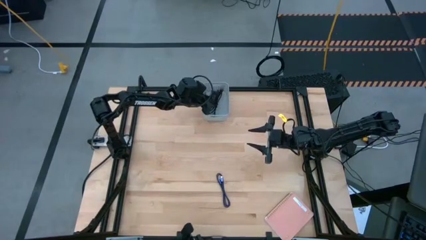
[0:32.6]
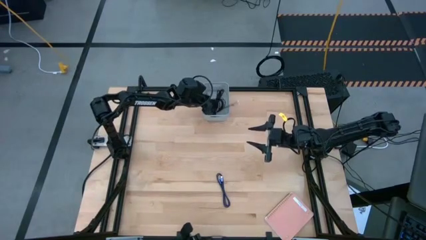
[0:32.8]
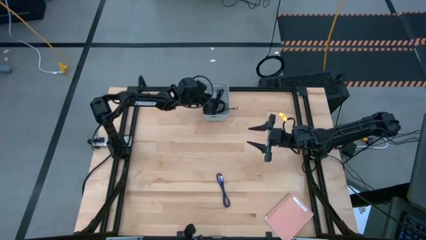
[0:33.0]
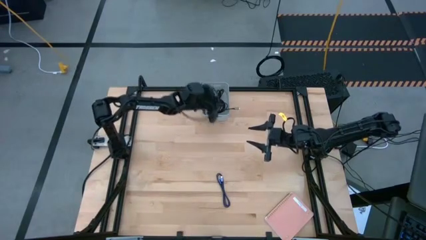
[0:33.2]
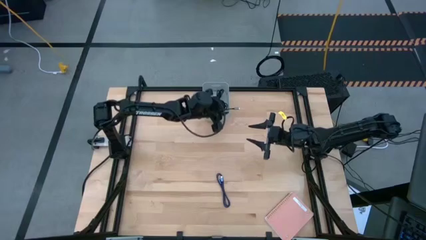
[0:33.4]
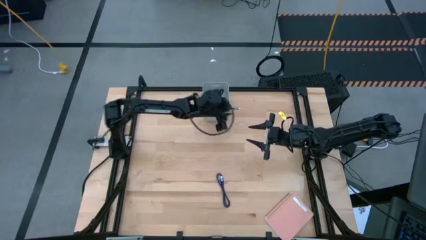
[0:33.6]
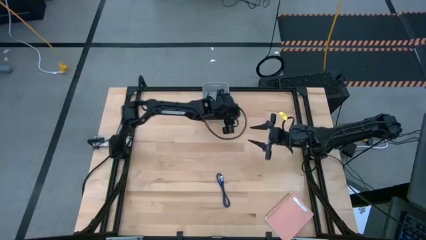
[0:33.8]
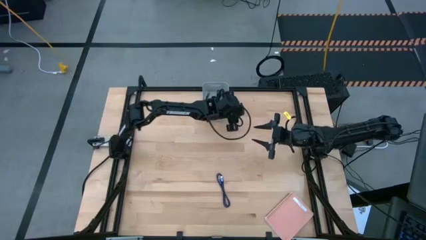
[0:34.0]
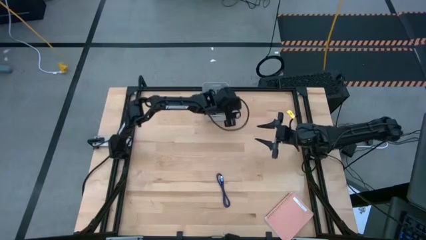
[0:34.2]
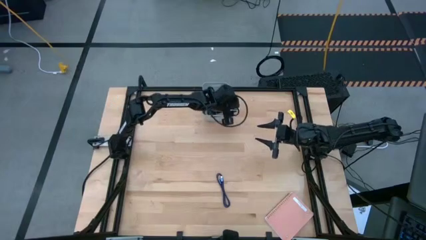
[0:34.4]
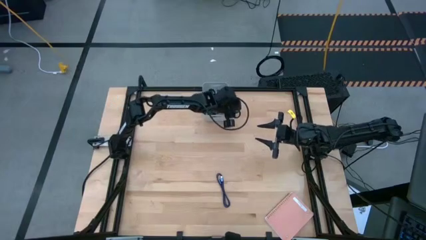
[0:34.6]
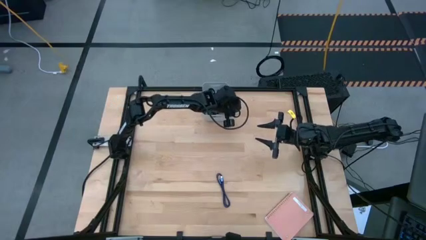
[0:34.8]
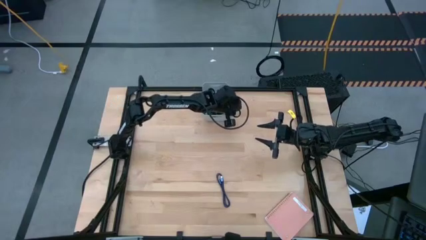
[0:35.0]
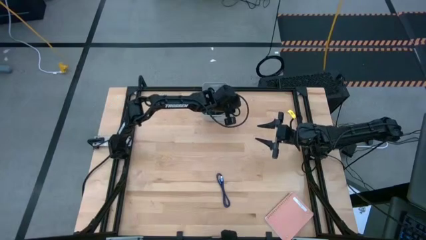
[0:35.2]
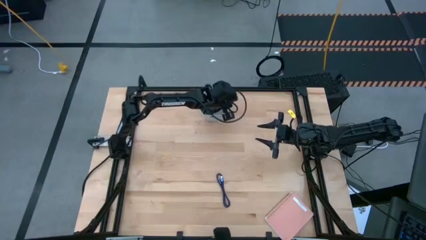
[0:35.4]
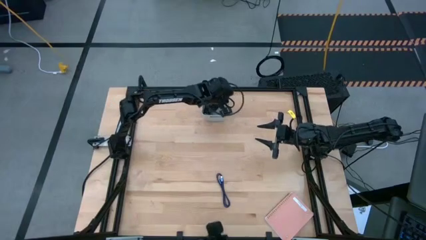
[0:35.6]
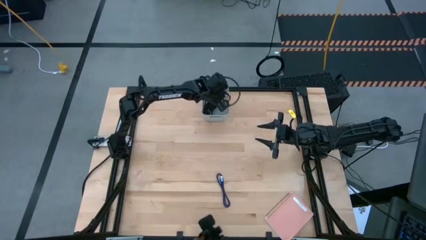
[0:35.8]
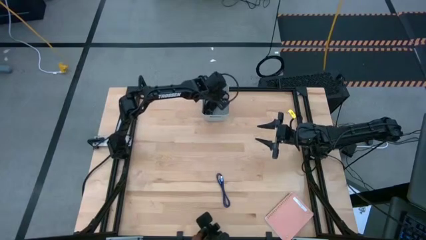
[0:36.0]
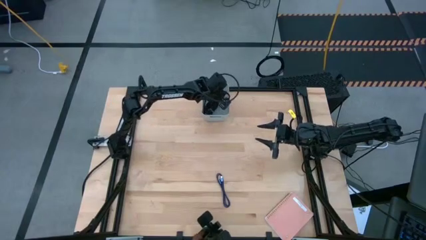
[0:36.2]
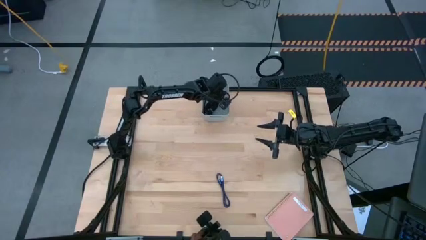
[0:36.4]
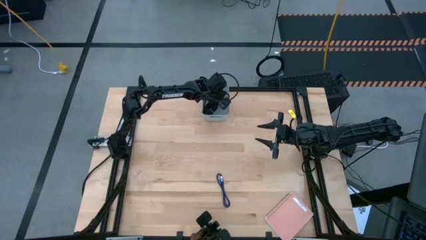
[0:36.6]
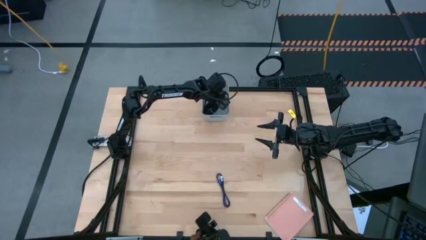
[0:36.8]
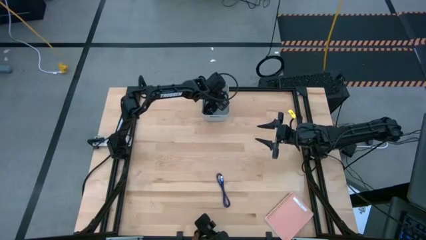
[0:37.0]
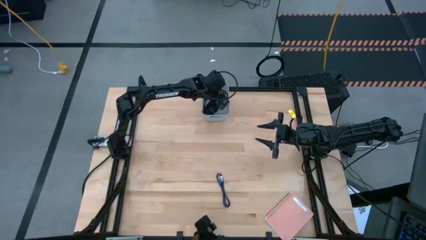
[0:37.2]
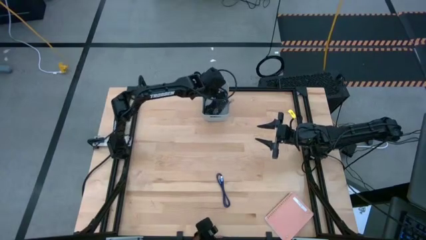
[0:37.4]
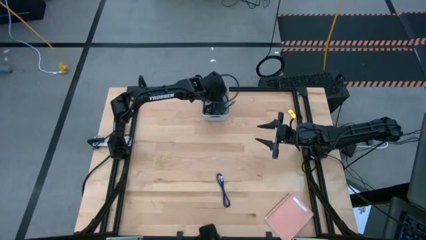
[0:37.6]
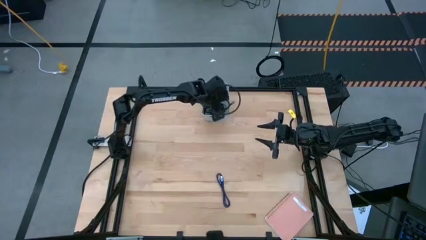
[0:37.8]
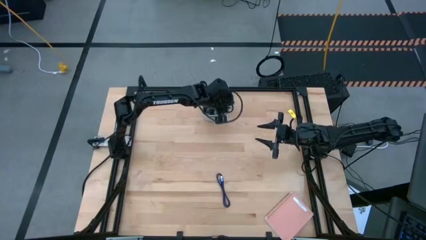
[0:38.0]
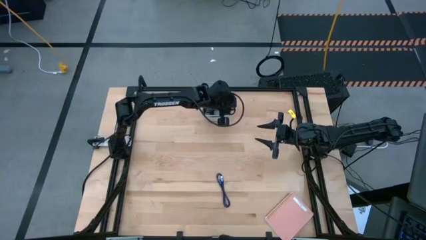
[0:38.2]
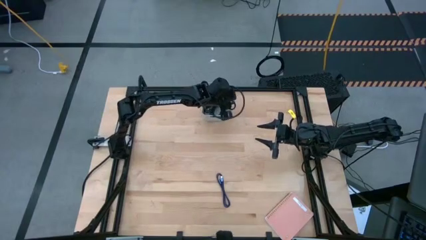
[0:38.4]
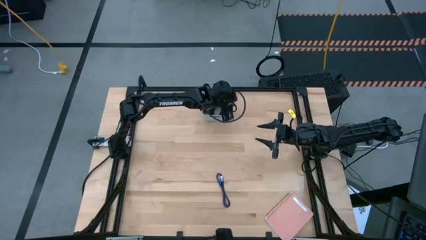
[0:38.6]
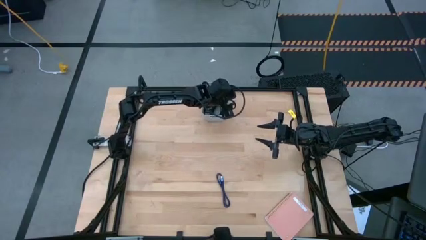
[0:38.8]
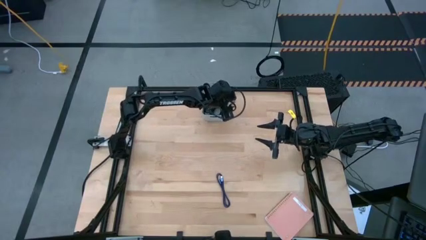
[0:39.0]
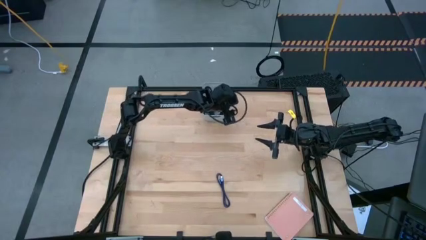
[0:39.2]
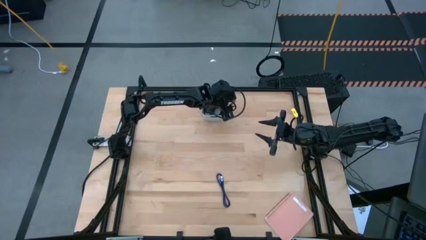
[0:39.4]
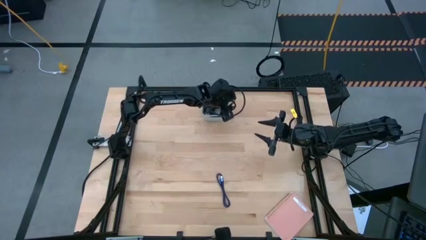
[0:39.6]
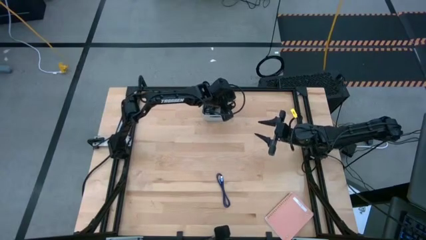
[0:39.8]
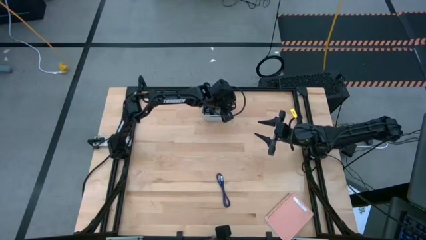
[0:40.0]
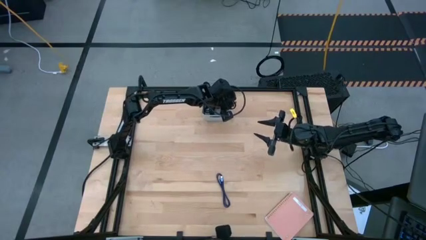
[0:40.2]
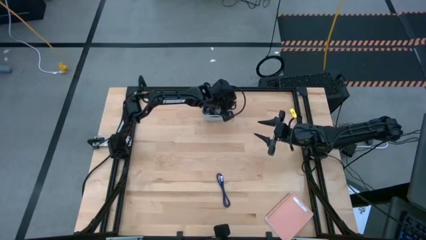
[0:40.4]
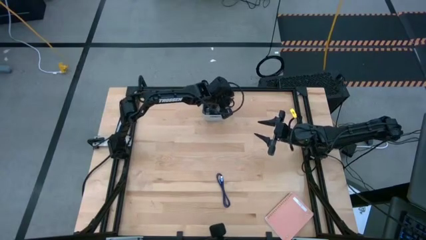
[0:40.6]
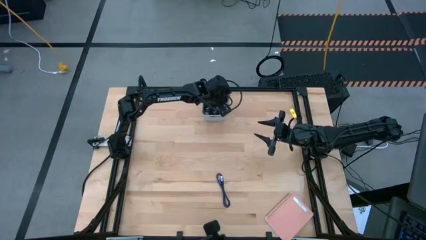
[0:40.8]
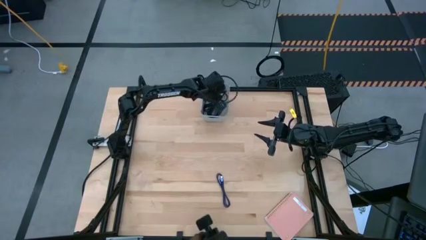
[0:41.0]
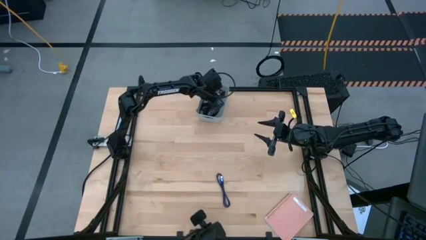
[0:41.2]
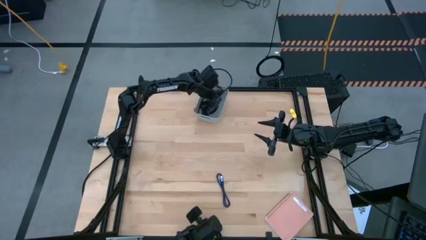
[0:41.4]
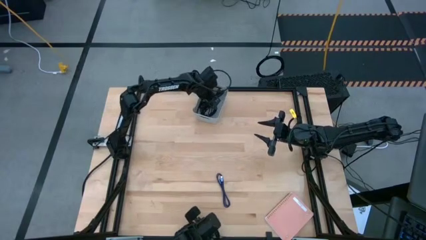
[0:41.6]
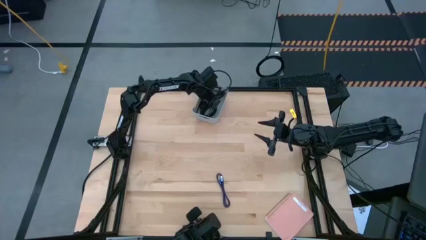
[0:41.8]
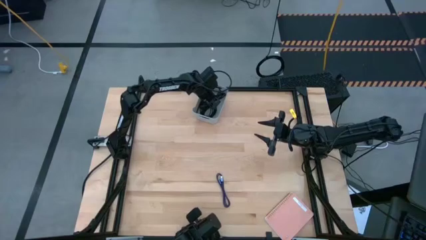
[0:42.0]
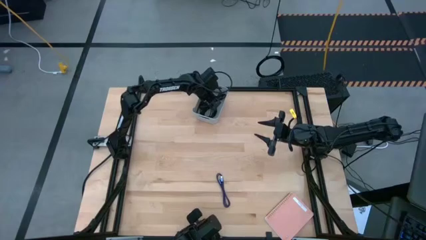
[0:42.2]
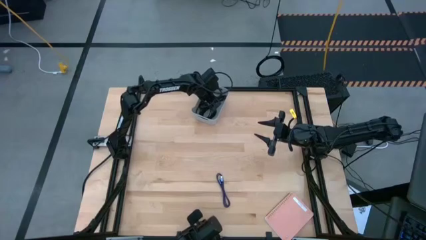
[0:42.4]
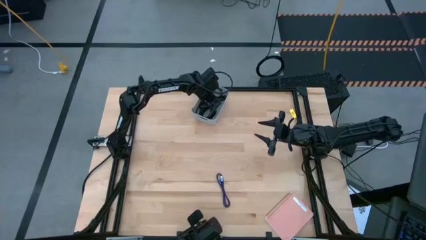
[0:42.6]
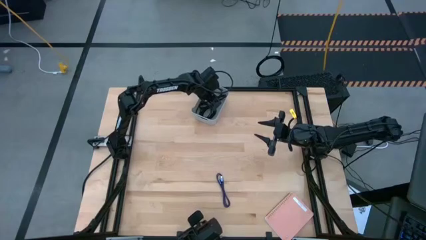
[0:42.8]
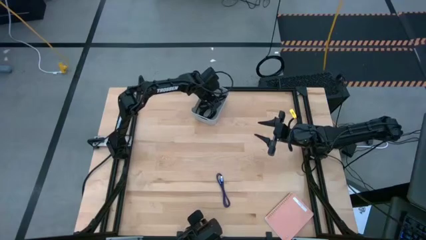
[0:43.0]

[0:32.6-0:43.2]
Task: Pick and place USB-C Cables
Put the black charger cable into the gray bin

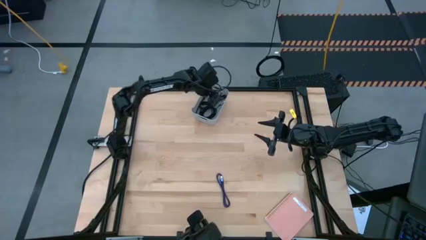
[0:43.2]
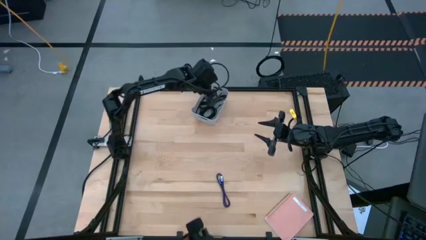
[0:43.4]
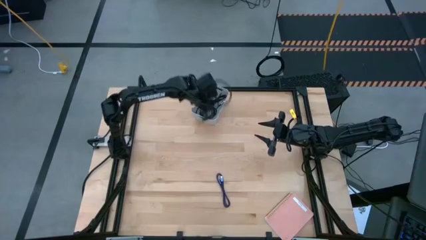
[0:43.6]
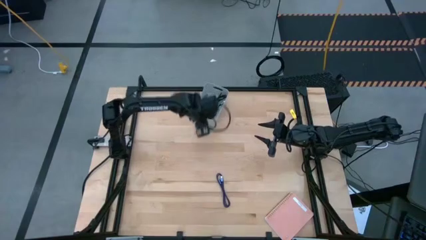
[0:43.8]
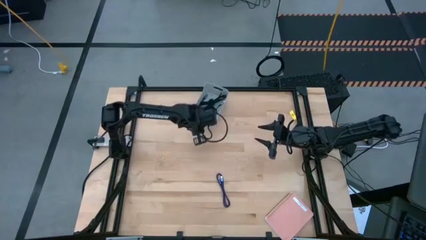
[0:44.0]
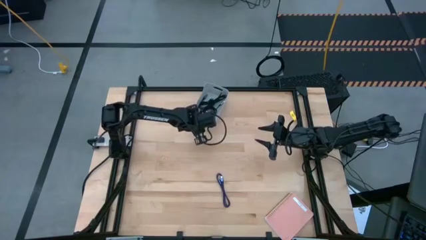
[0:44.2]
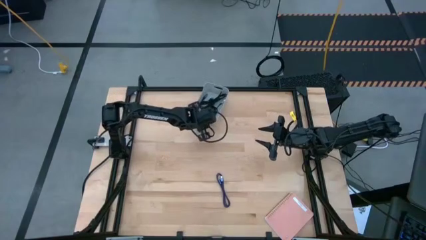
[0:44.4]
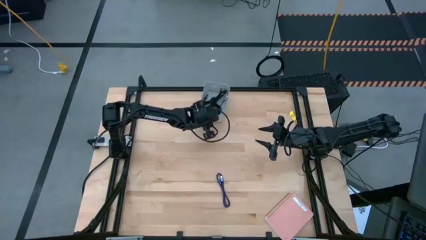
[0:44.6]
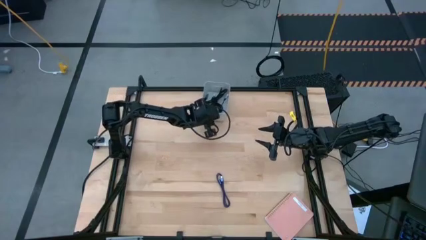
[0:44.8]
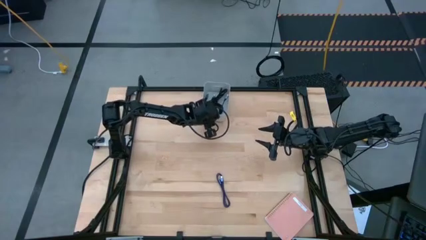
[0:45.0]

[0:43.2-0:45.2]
Adjust the gray bin

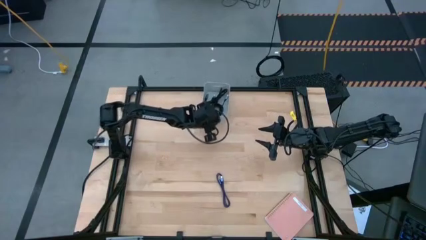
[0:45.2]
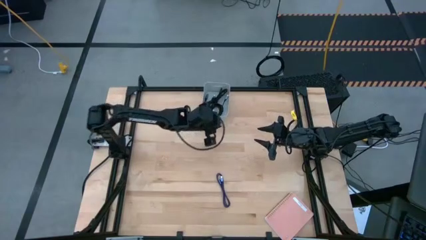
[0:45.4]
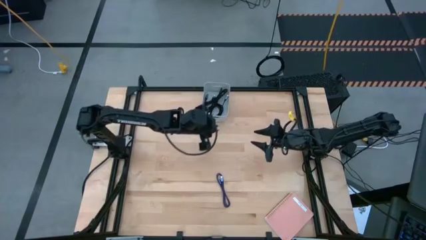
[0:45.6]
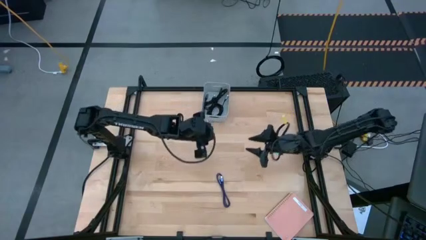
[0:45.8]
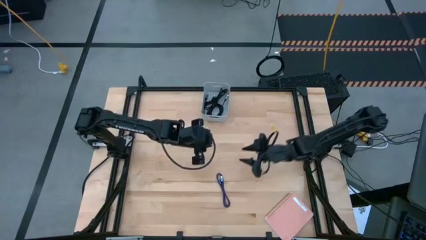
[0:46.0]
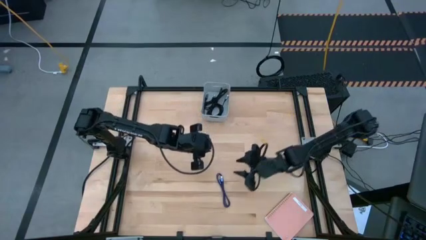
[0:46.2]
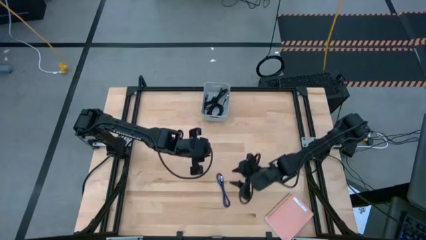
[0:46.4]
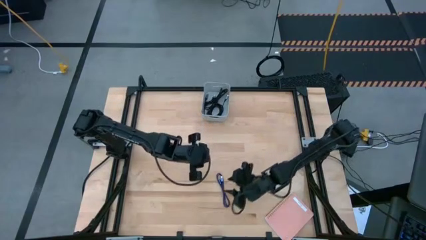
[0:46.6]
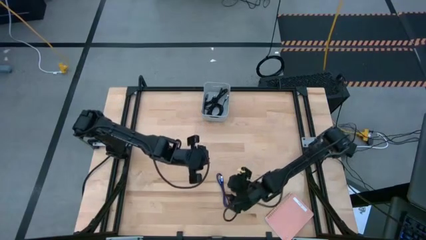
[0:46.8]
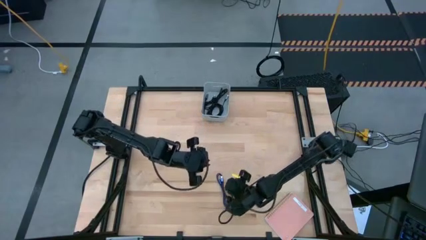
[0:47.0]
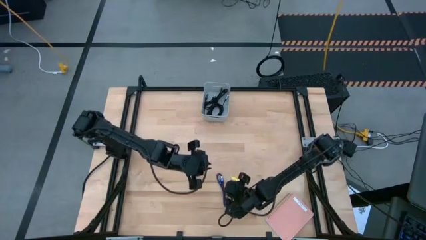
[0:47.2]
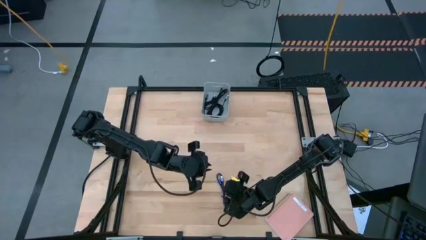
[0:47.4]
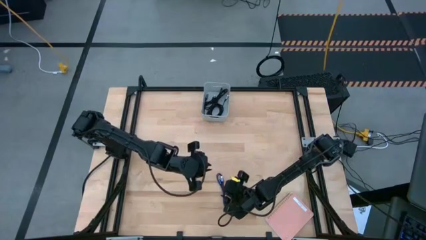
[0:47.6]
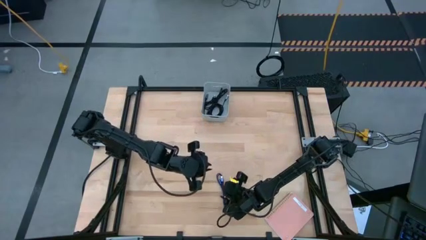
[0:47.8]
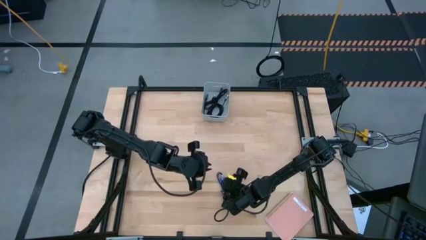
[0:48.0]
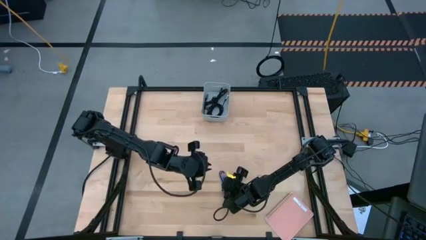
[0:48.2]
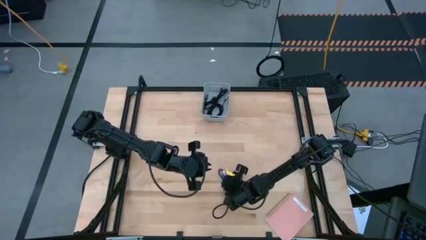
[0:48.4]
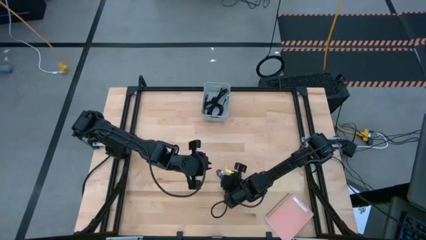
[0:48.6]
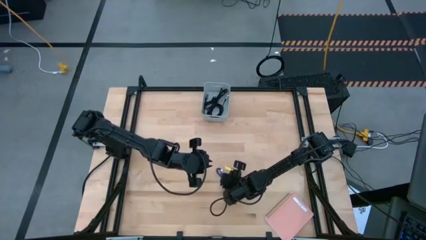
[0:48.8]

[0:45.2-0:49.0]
Put the blue charger cable into the gray bin
